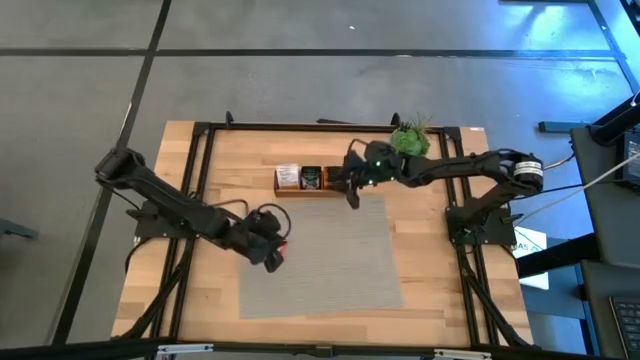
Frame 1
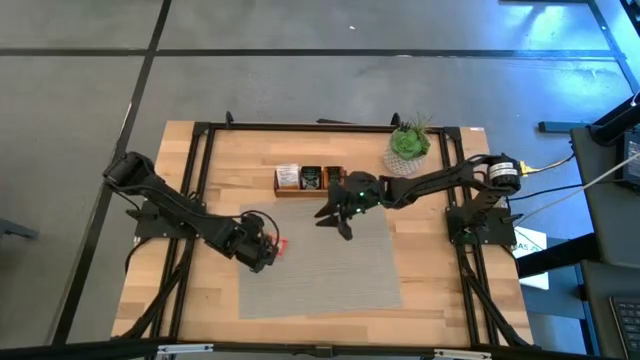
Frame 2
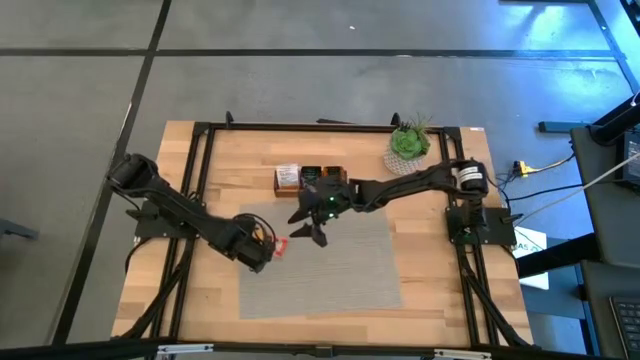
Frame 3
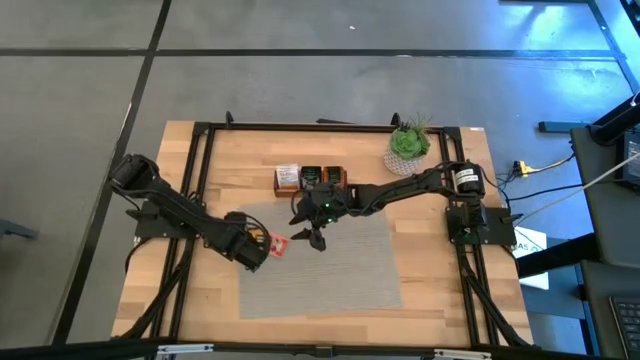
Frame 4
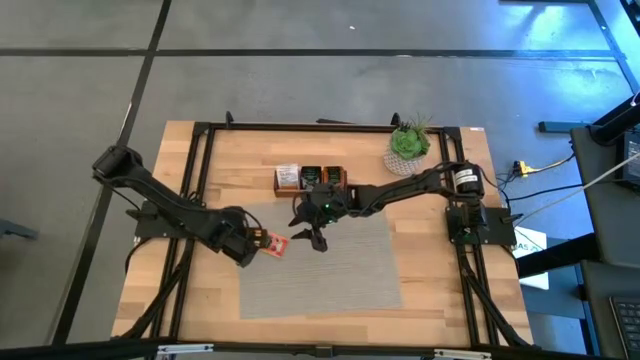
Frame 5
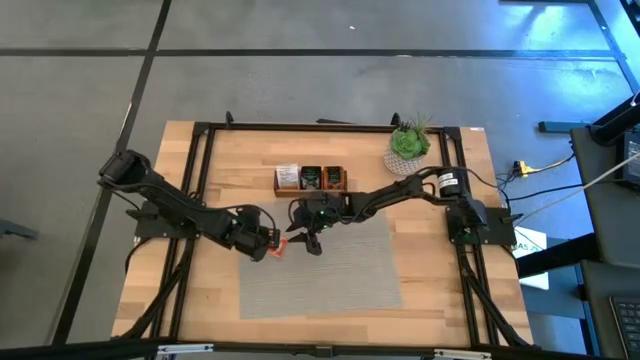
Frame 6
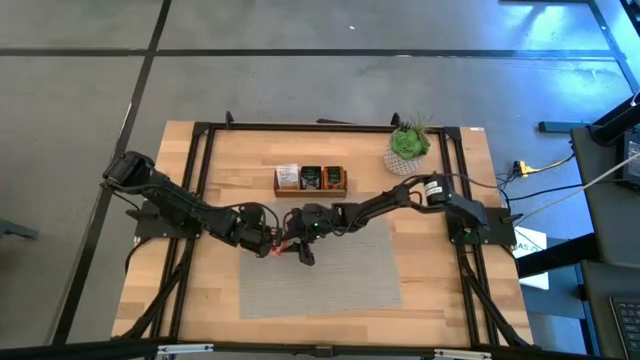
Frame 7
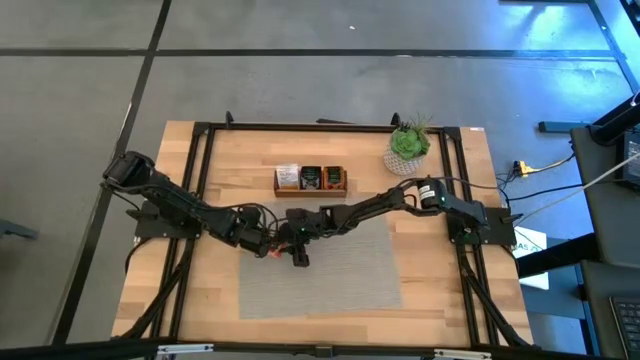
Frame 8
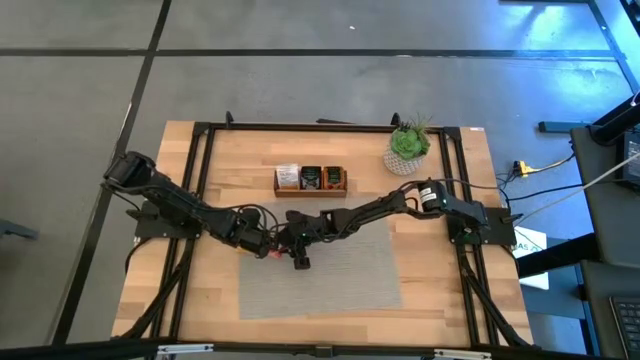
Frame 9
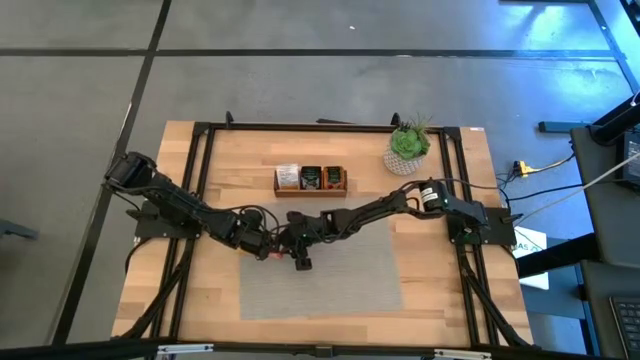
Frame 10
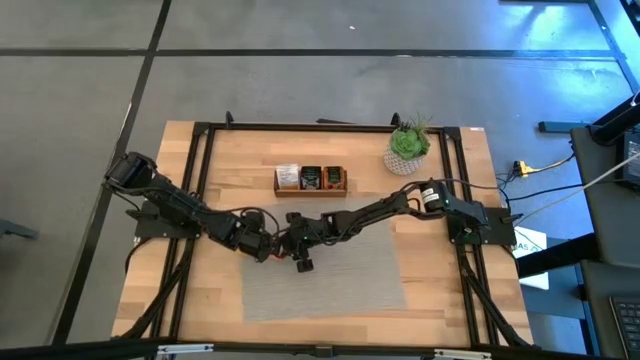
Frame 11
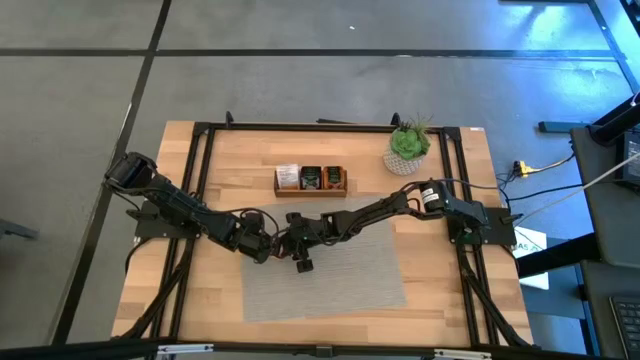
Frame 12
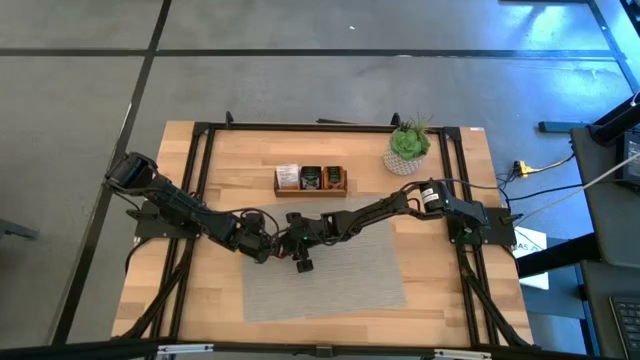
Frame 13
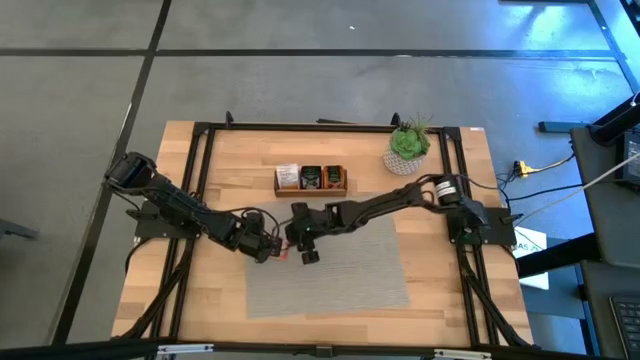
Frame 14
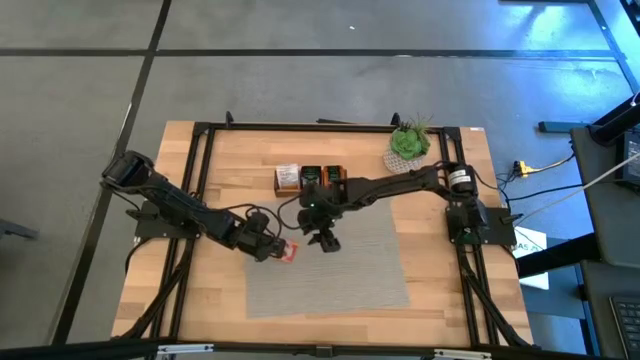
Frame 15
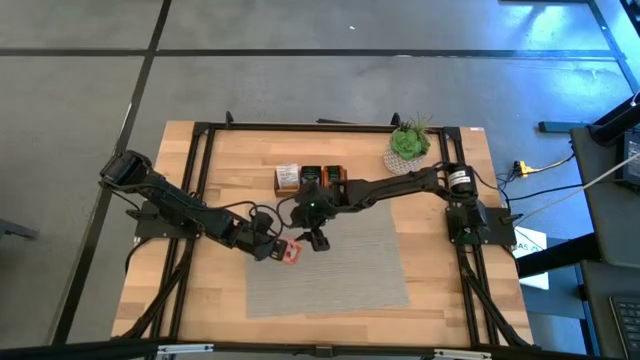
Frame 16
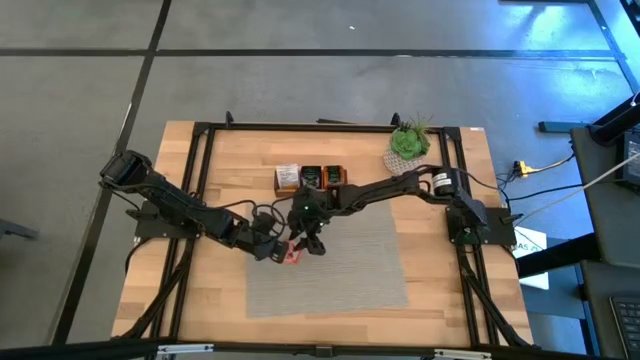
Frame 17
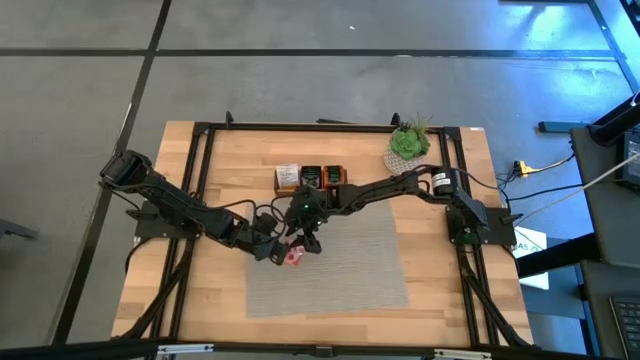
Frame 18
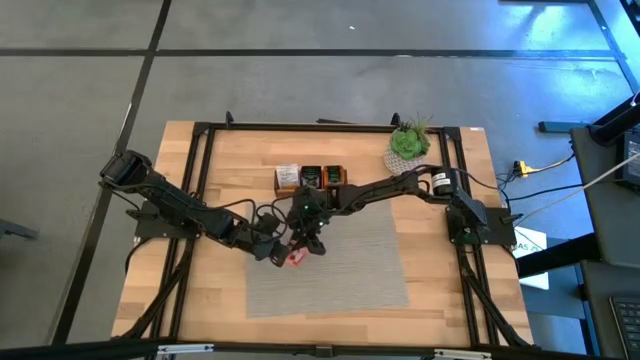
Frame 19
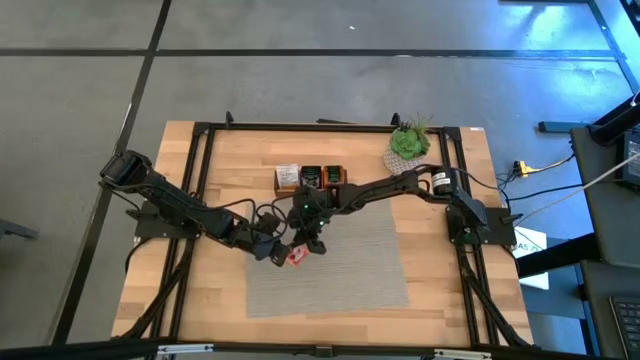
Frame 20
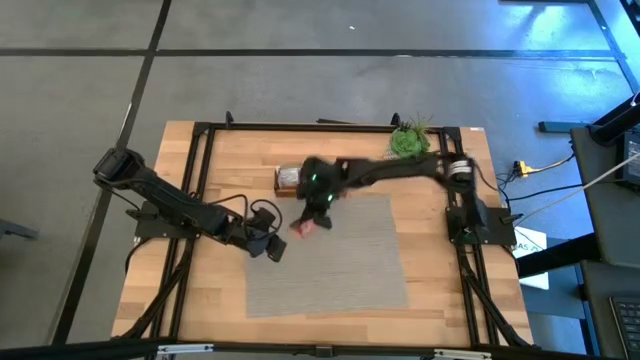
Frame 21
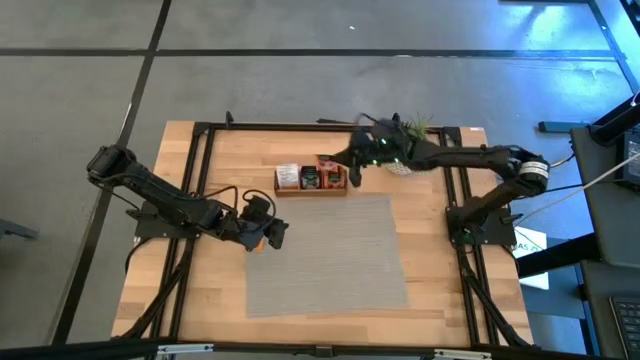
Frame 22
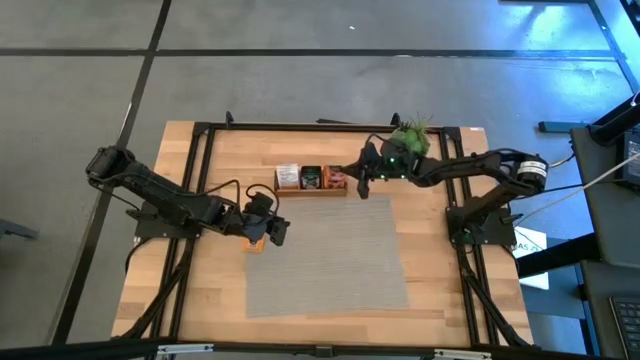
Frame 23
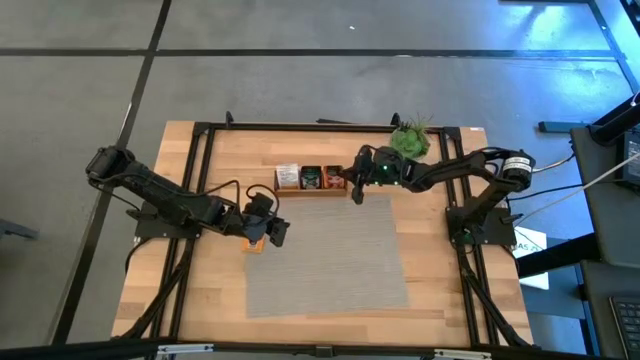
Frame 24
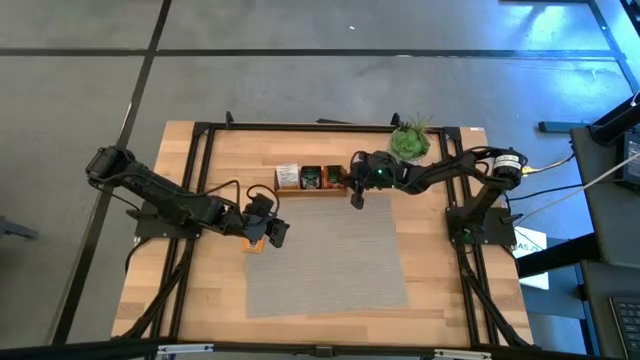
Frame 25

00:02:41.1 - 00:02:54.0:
Task: Pick & Place Tea
Put the orange tea bag into the right section of the wooden organizer

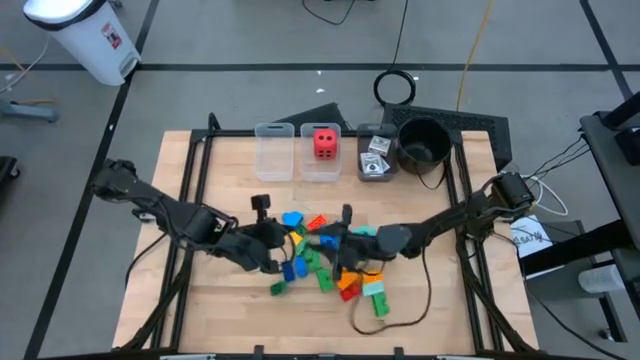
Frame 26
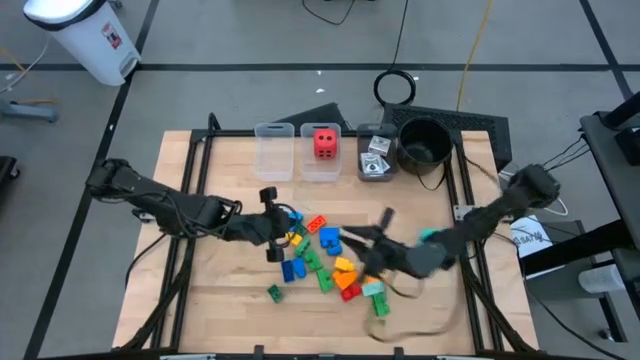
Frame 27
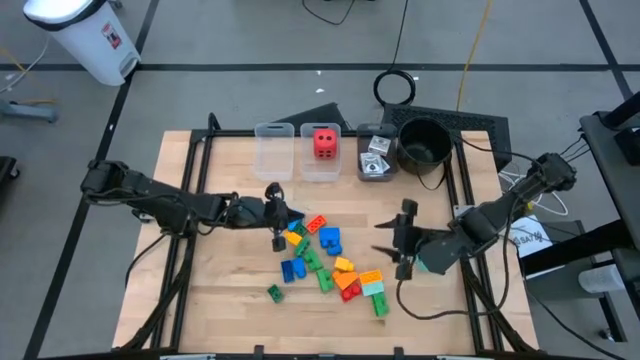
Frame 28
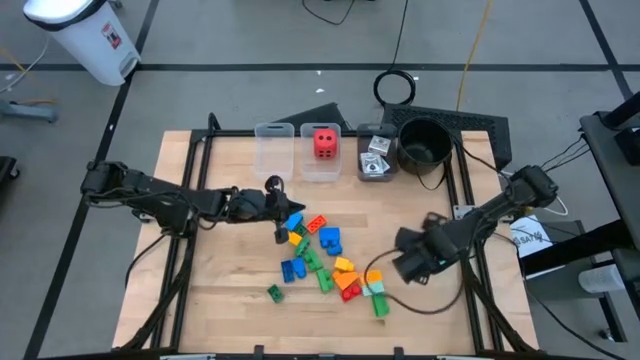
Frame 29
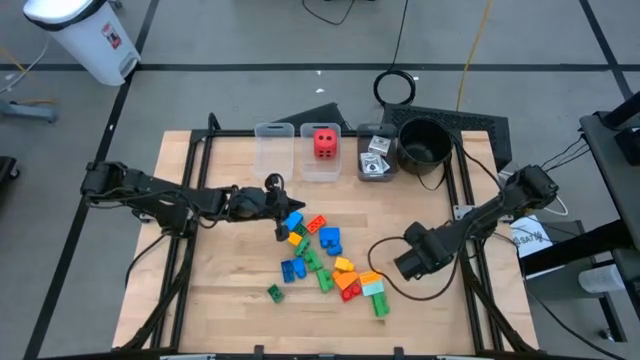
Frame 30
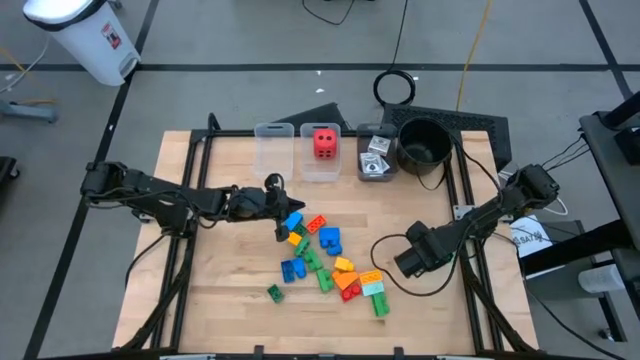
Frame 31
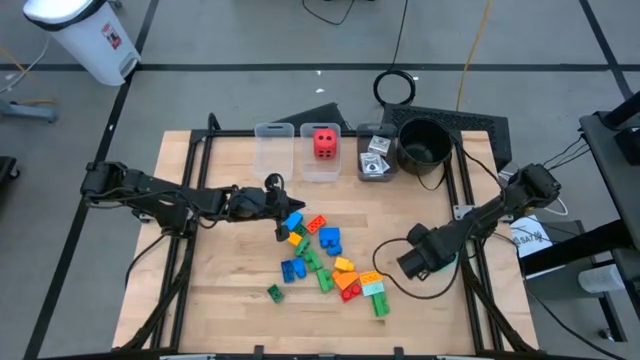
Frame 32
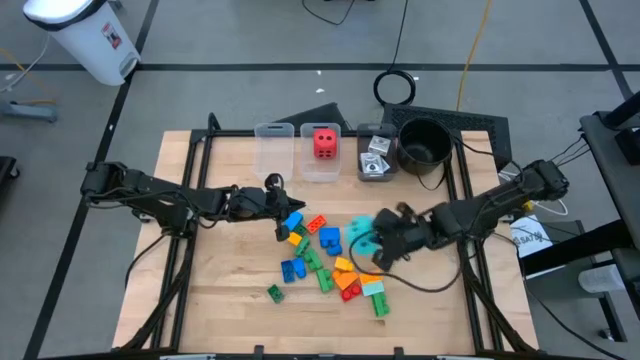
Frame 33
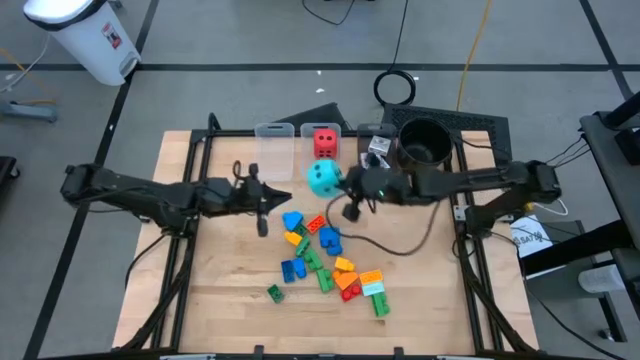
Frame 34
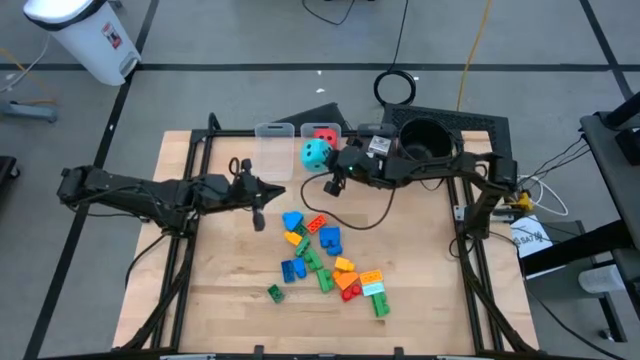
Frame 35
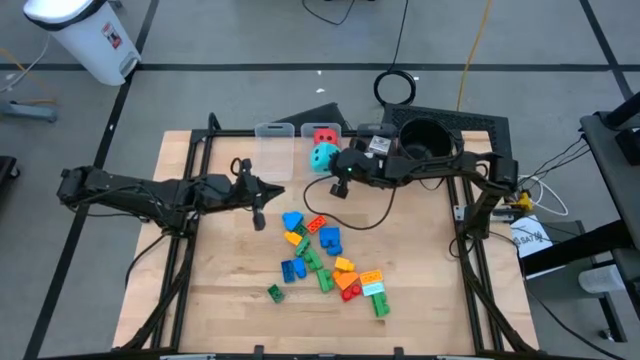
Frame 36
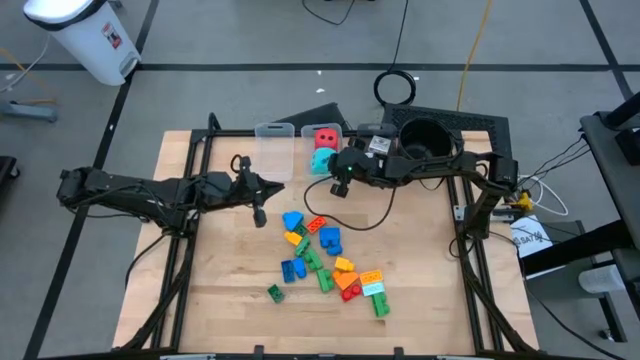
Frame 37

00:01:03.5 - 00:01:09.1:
Task: Pick & Place Toys
Put the blue dice into the right transparent bin

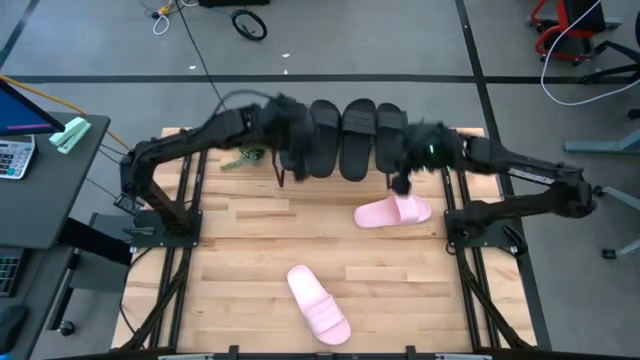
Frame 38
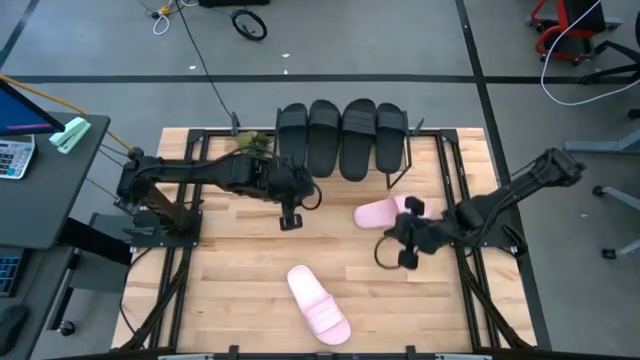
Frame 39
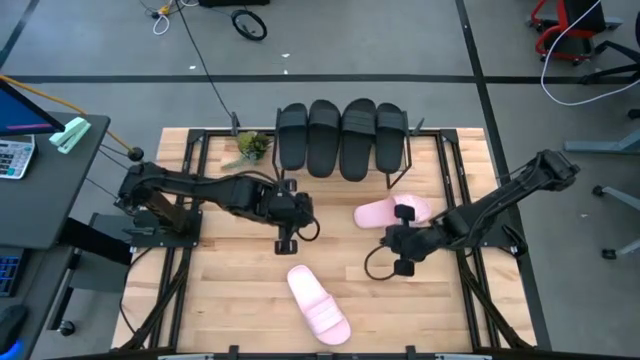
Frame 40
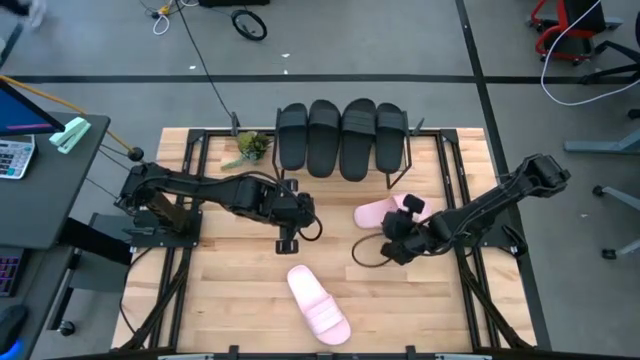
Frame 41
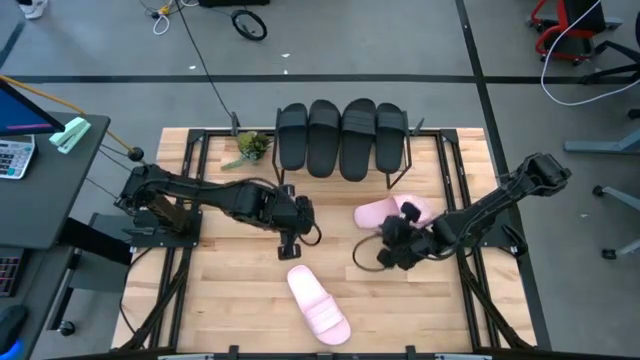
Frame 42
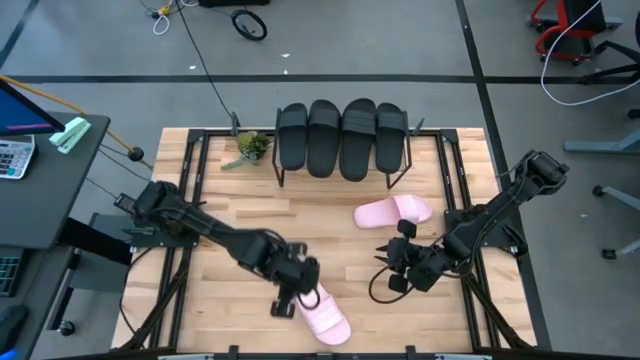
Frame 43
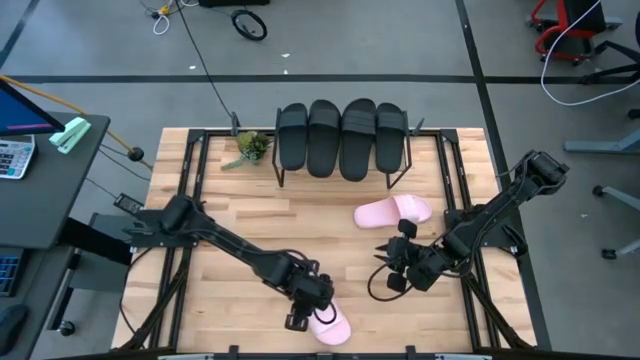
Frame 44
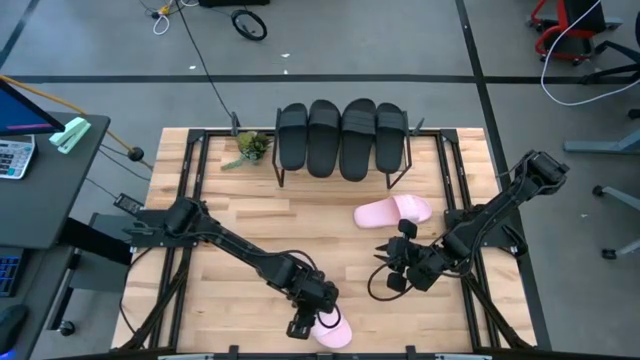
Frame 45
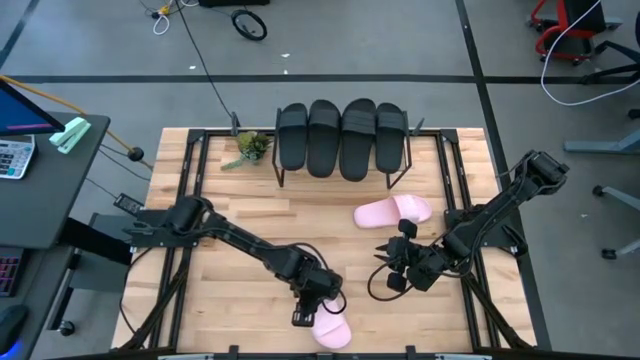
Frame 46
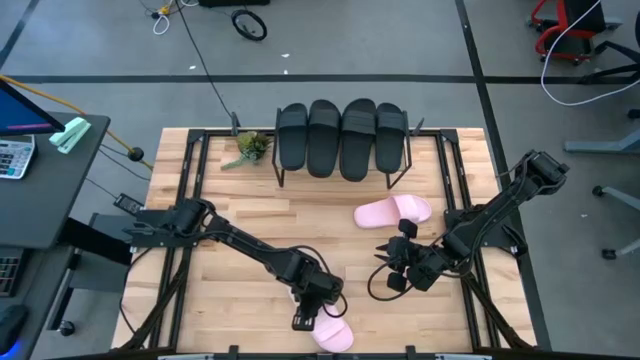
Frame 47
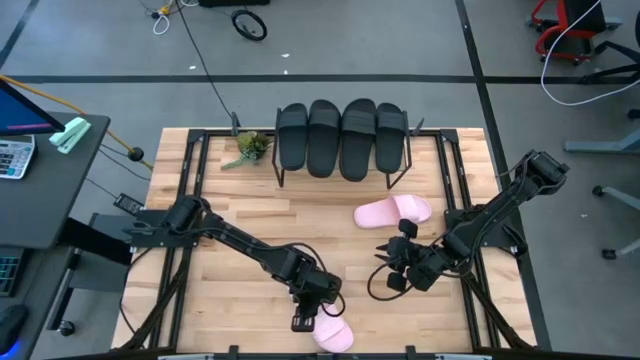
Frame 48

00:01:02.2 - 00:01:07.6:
Task: Pick and place slides into the shelf
Put the pink slide under the shelf
